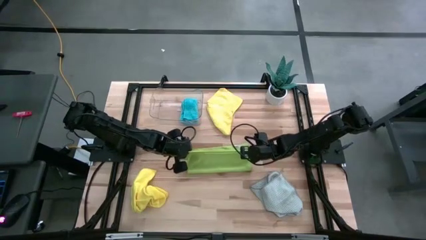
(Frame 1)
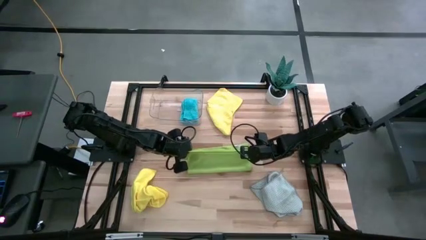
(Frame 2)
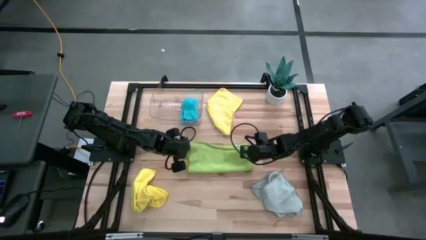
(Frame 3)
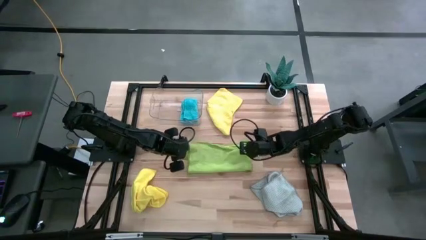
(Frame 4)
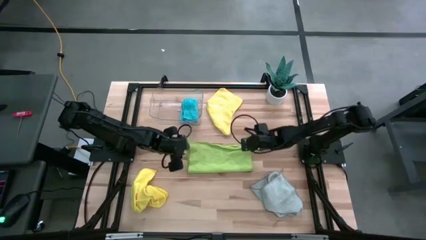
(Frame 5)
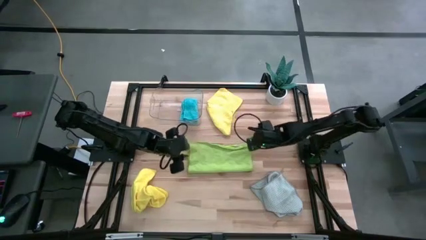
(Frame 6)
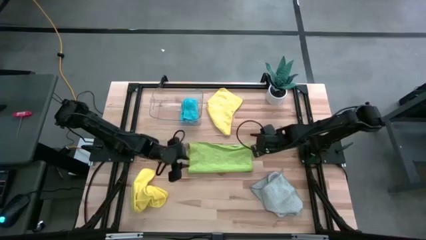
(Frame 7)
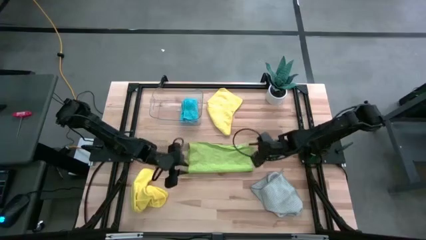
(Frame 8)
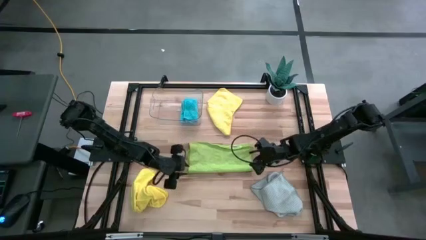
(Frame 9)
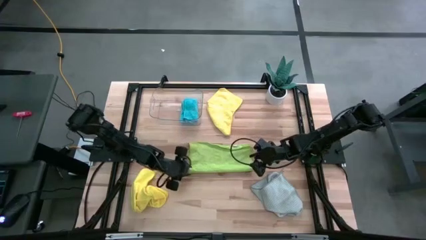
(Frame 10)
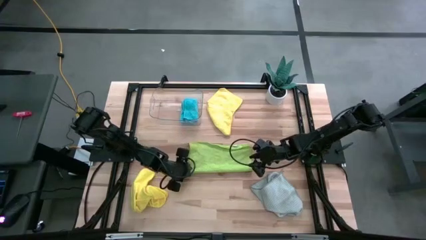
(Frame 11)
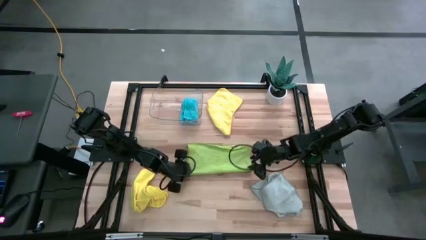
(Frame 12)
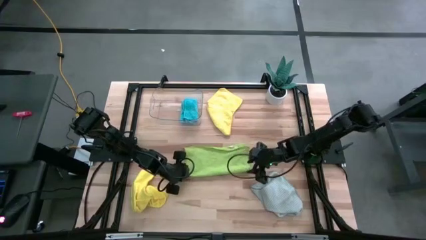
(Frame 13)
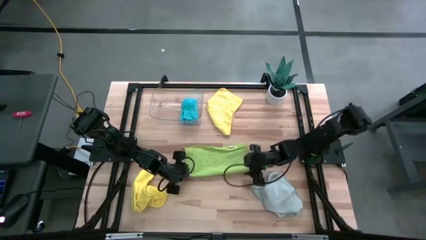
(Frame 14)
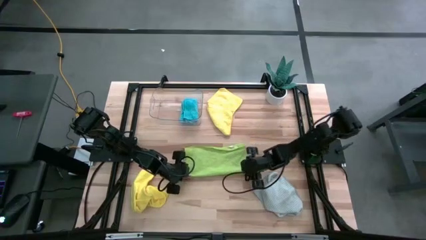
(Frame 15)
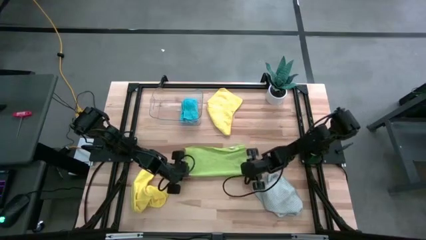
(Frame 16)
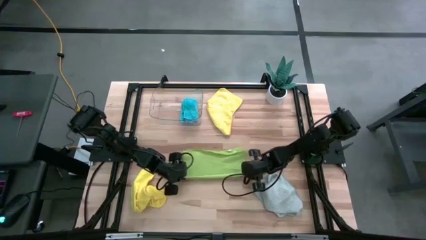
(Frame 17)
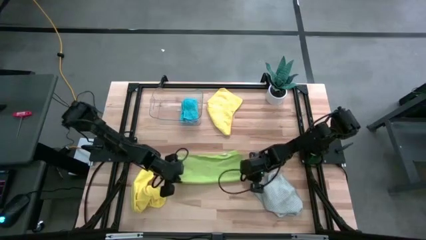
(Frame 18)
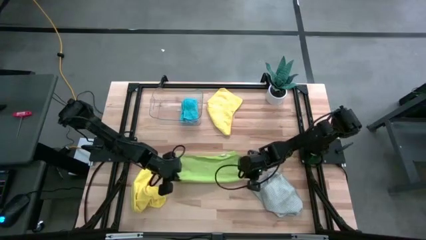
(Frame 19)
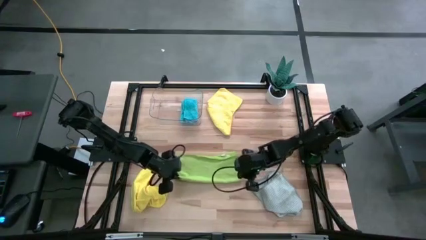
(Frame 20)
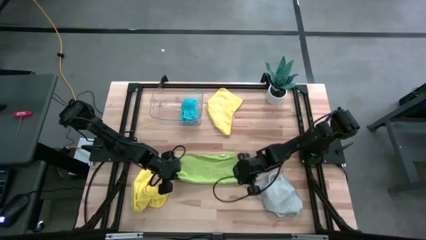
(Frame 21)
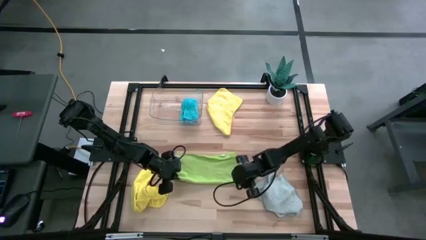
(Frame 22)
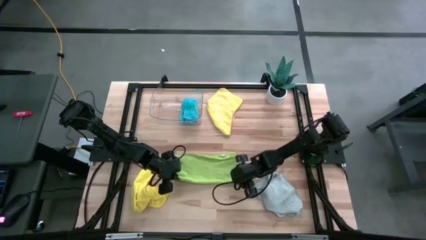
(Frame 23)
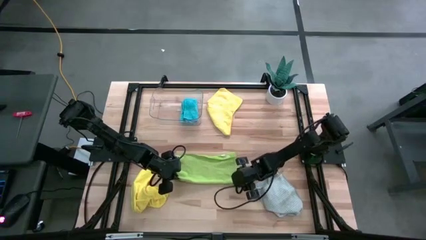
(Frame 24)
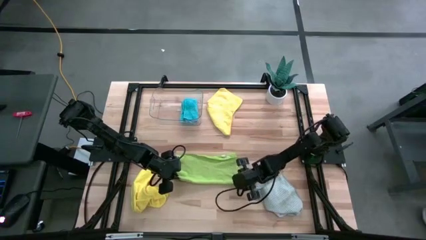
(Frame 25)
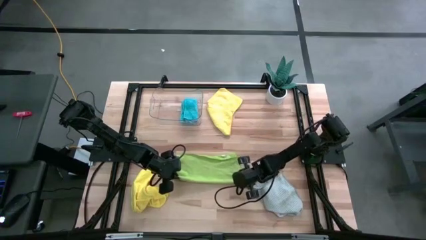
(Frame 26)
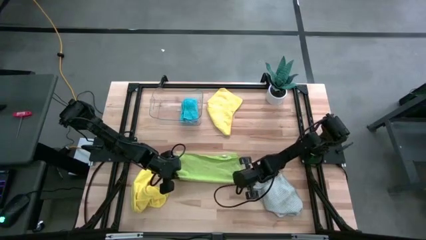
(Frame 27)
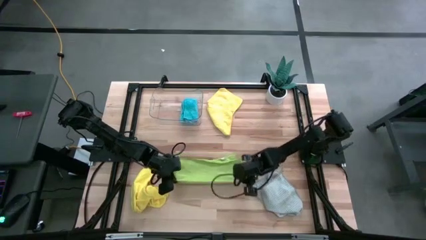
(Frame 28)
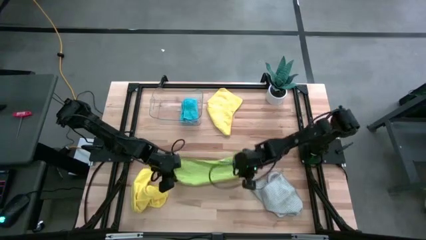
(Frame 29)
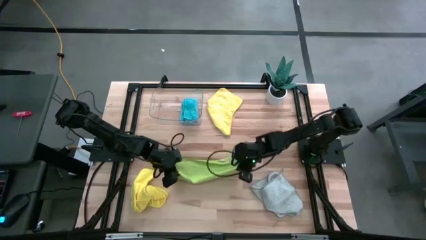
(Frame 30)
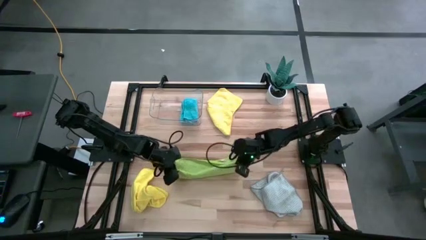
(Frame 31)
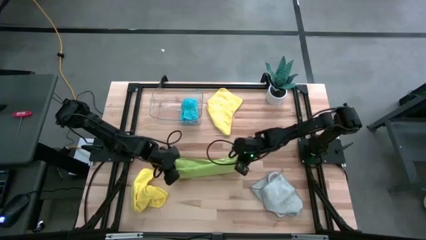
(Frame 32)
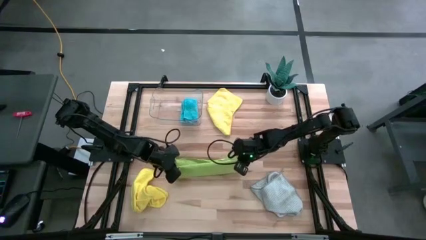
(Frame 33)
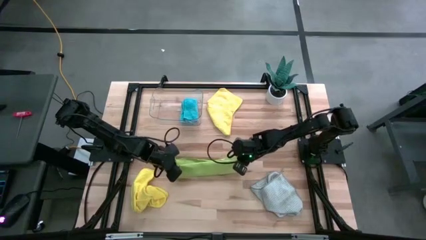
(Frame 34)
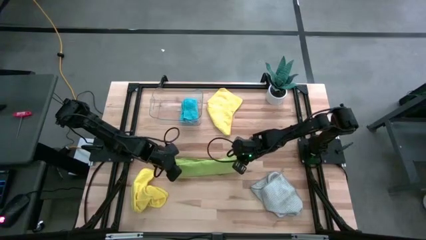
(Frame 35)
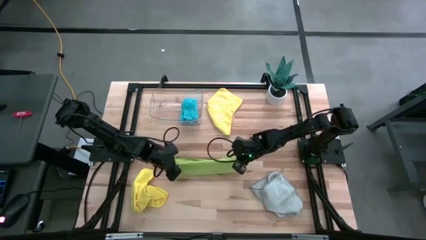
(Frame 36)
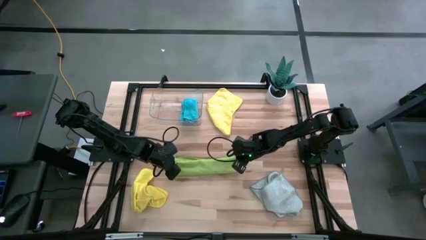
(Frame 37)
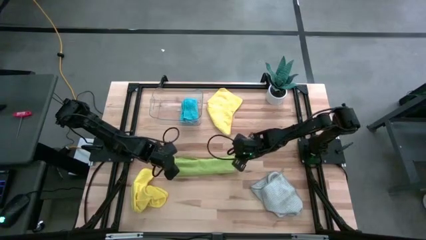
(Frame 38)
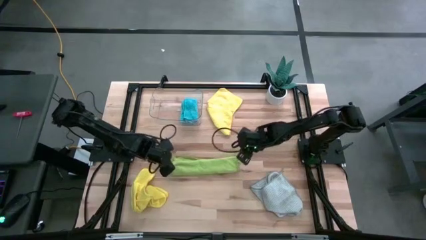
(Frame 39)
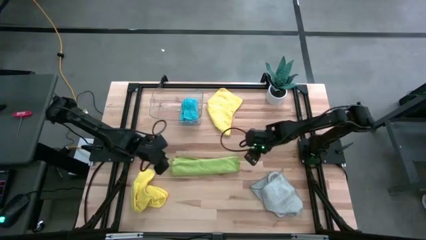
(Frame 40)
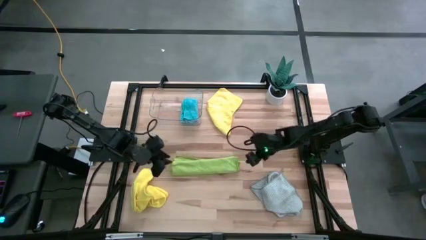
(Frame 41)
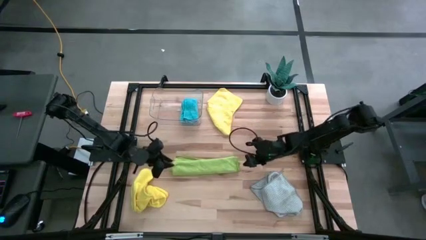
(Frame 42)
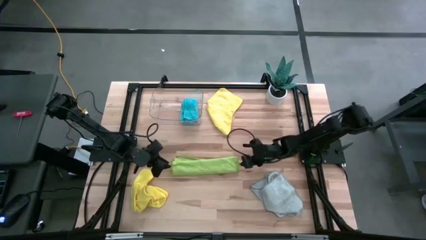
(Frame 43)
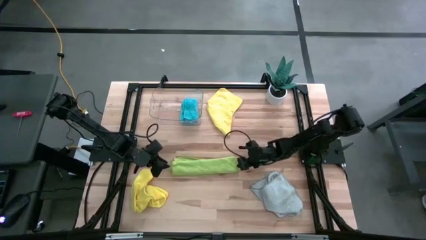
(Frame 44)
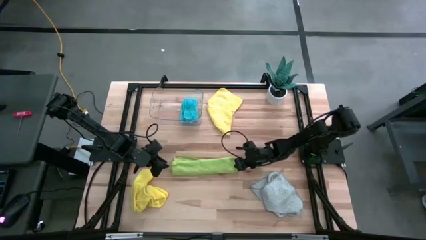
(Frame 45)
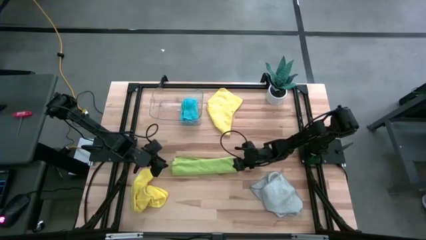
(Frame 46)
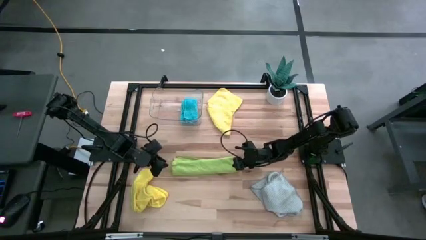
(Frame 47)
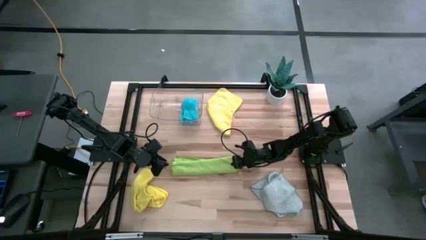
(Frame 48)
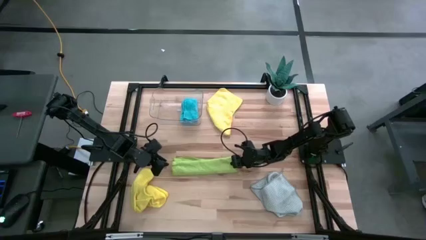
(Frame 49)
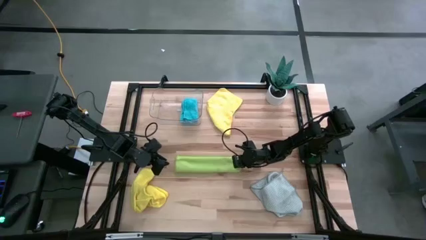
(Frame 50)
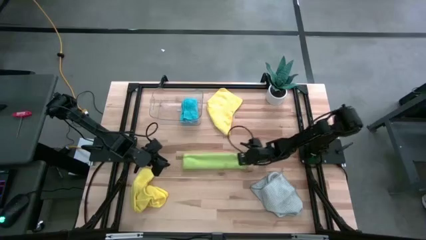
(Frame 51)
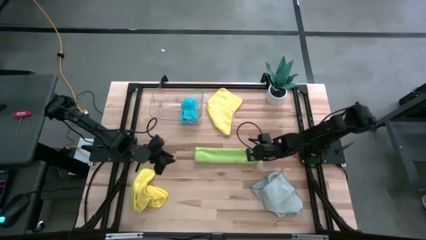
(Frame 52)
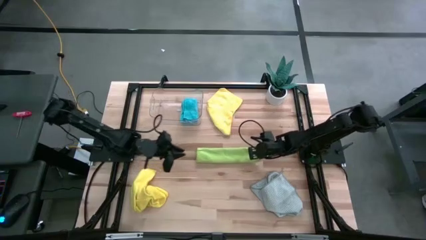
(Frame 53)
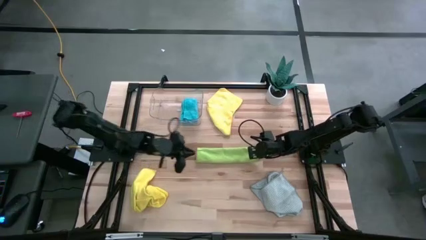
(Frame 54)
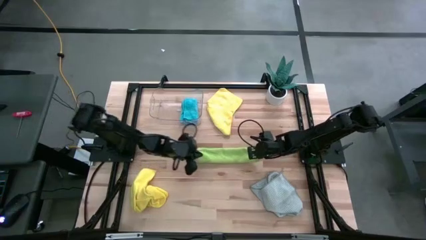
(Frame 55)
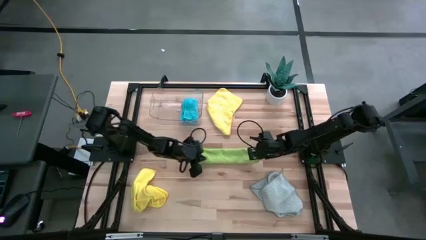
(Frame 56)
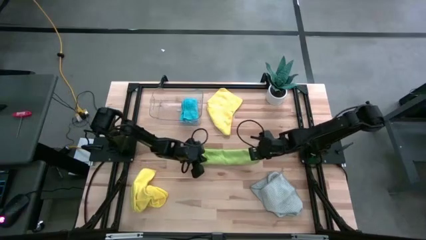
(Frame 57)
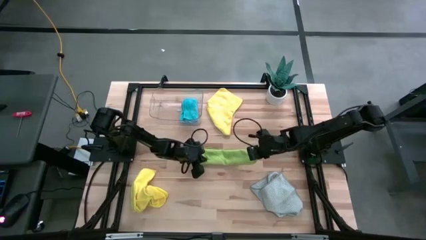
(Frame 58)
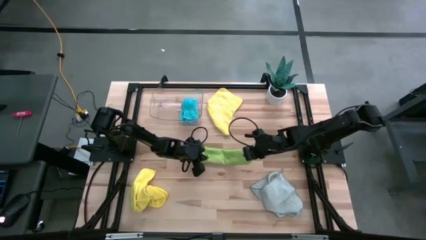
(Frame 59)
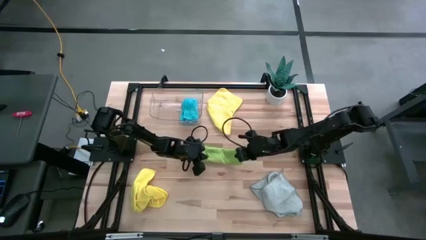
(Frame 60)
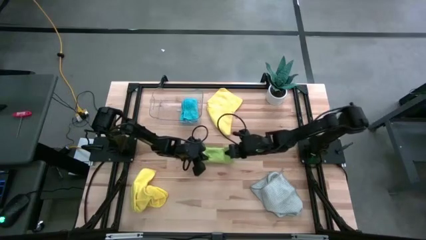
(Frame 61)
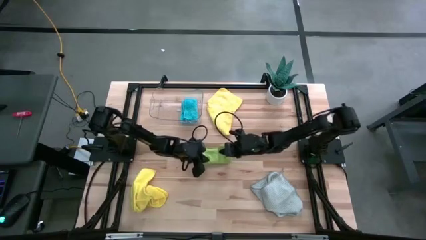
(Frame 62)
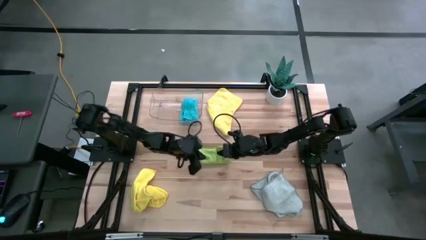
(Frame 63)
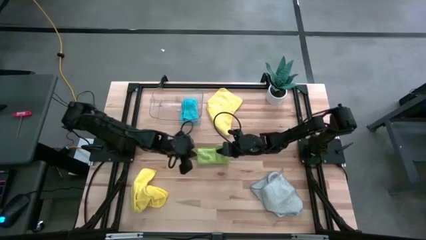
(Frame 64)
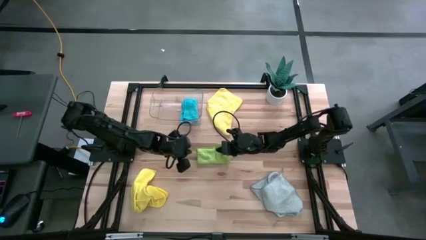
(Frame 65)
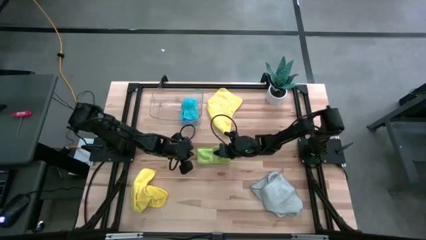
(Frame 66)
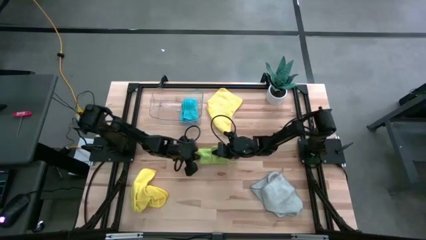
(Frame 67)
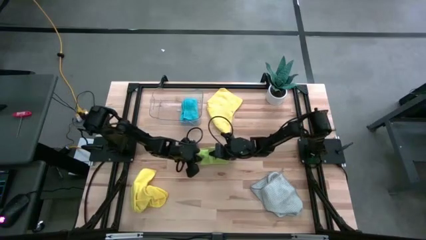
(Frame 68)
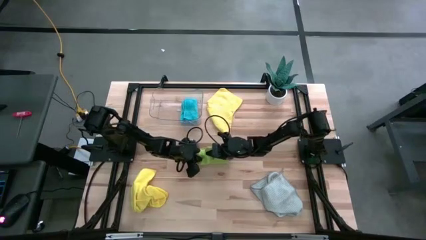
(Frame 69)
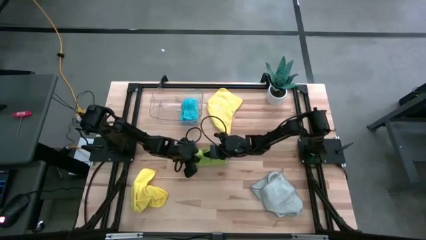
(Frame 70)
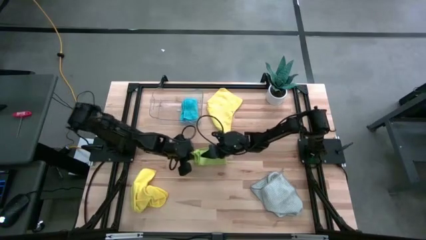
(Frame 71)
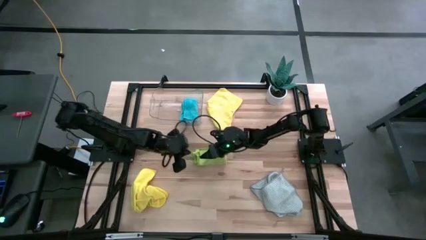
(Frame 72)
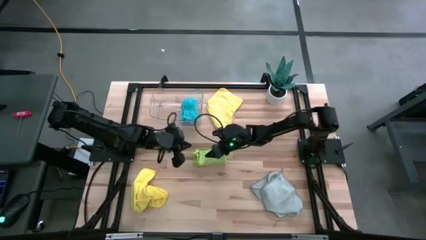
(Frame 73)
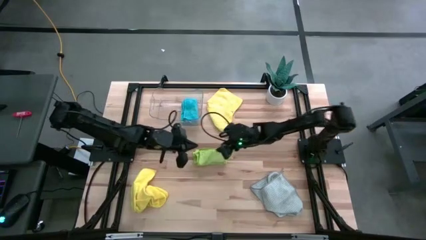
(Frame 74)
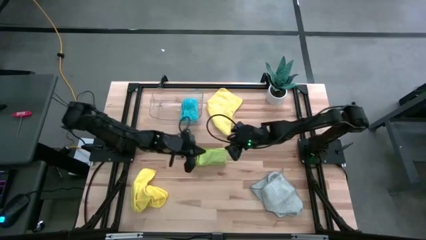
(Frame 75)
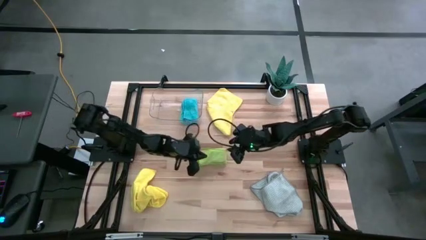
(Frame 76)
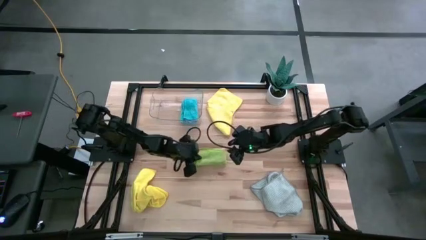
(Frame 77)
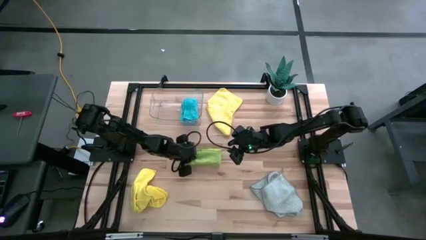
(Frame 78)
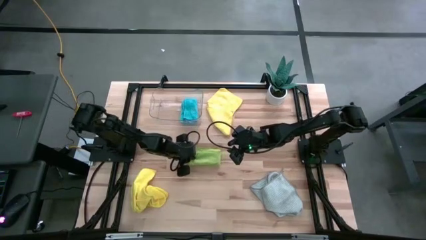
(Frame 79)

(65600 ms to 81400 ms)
Task: Fold microfiber towels
Fold the green towel
